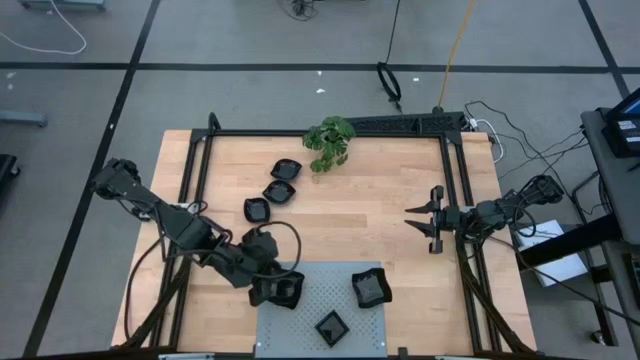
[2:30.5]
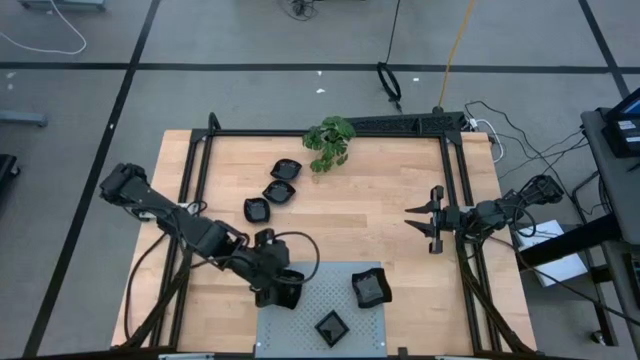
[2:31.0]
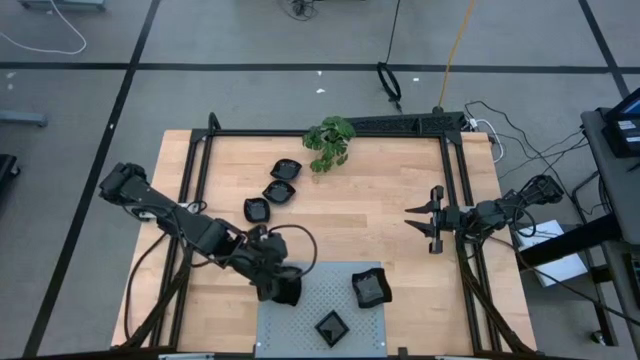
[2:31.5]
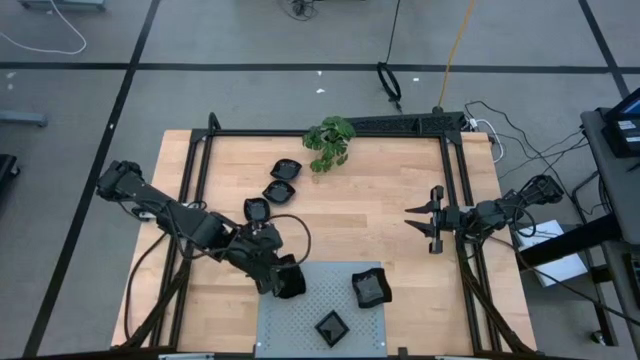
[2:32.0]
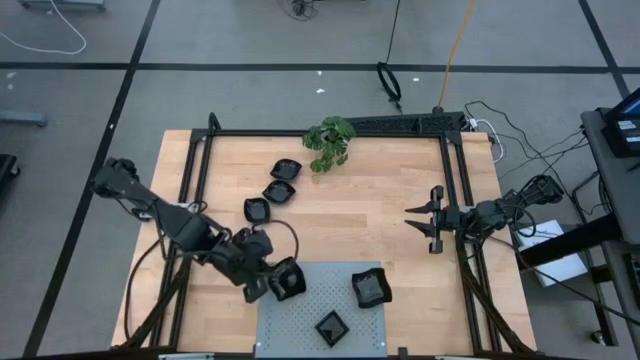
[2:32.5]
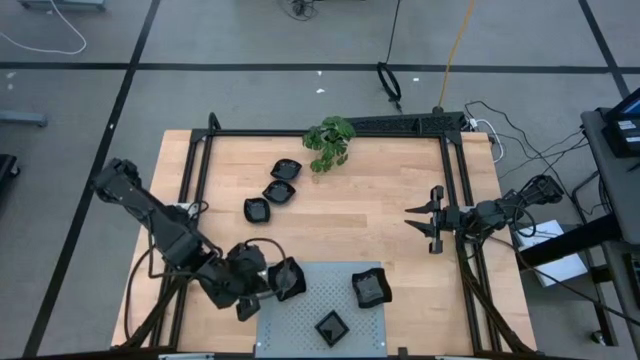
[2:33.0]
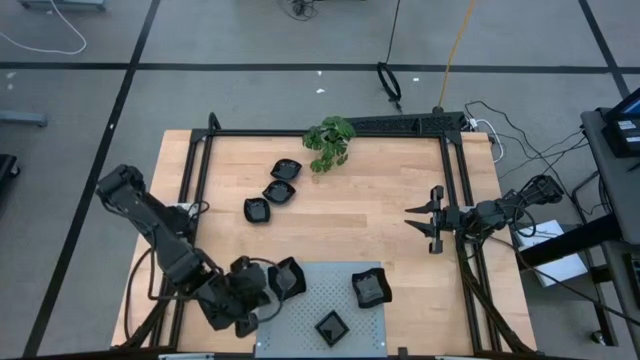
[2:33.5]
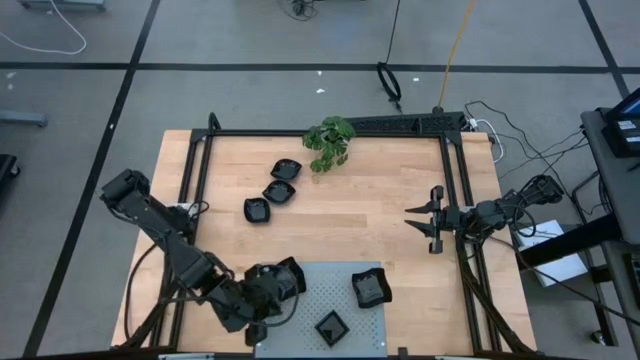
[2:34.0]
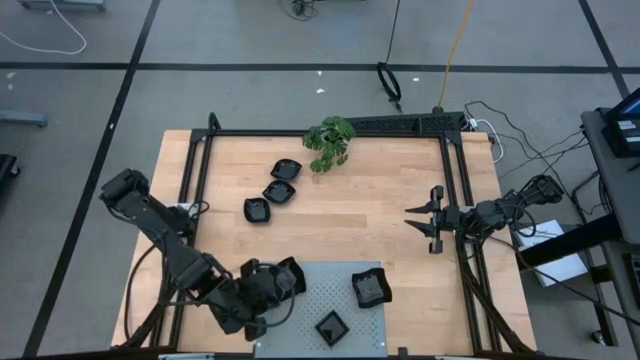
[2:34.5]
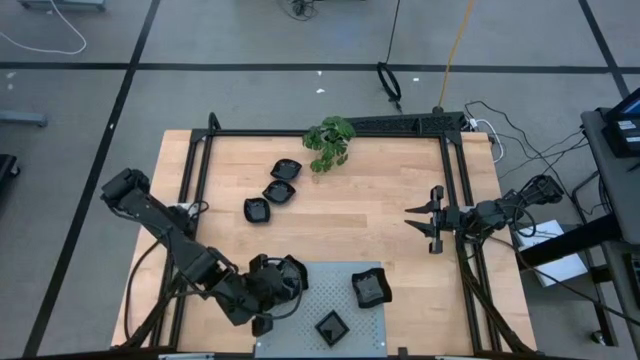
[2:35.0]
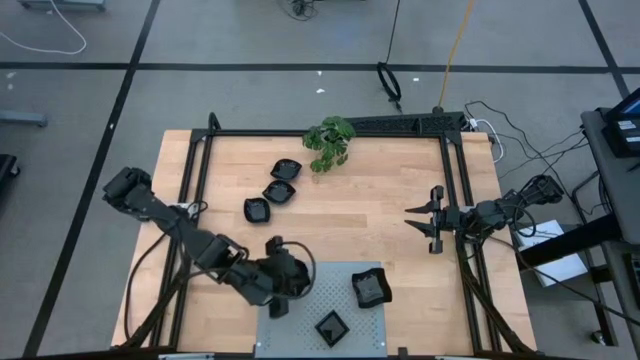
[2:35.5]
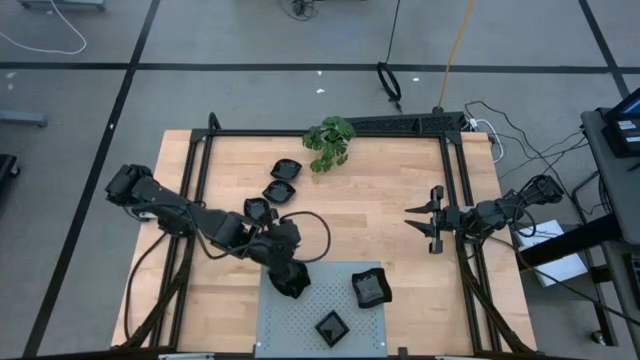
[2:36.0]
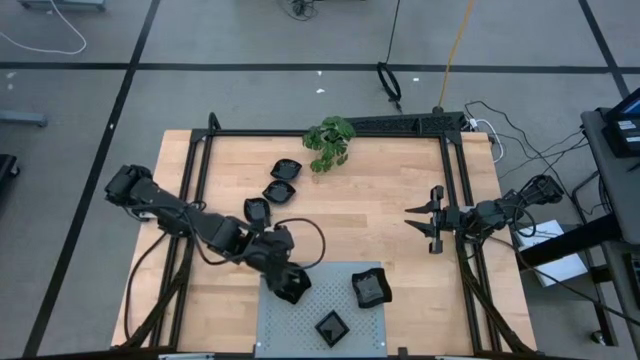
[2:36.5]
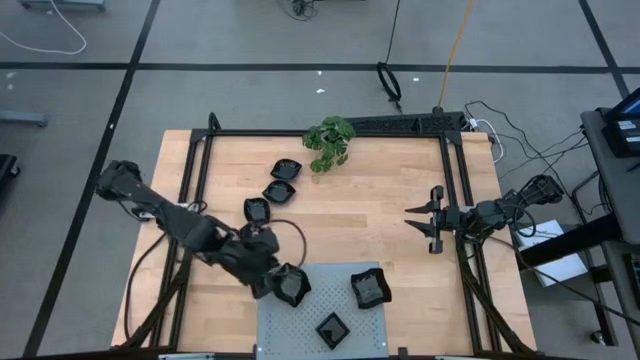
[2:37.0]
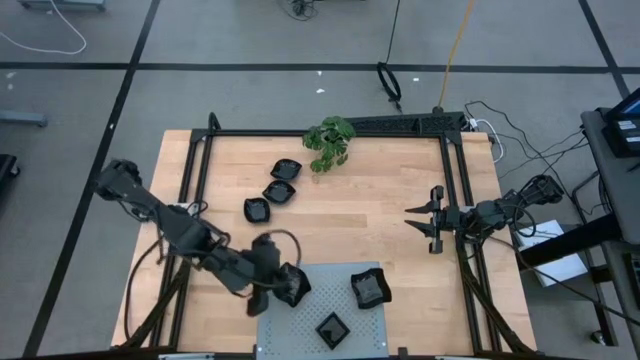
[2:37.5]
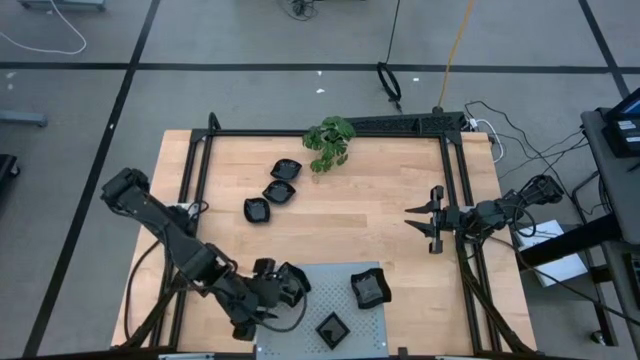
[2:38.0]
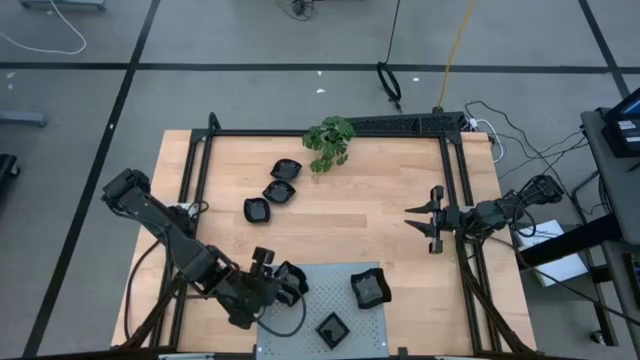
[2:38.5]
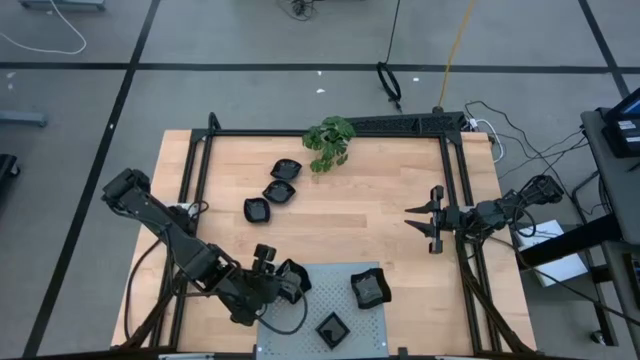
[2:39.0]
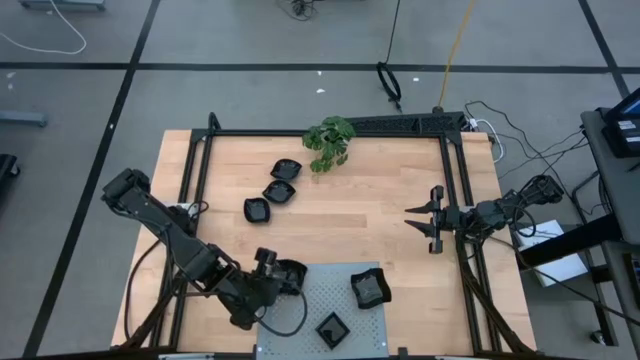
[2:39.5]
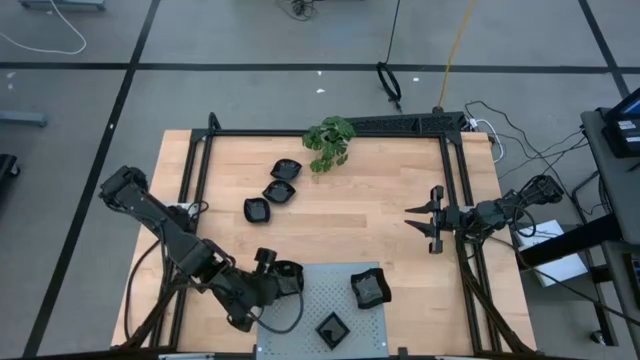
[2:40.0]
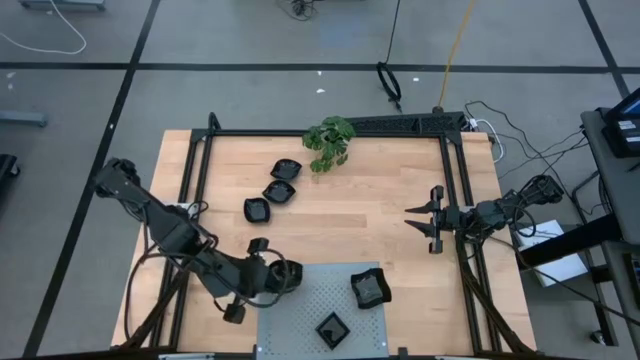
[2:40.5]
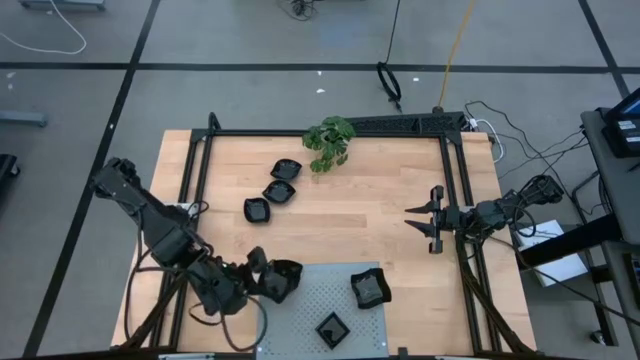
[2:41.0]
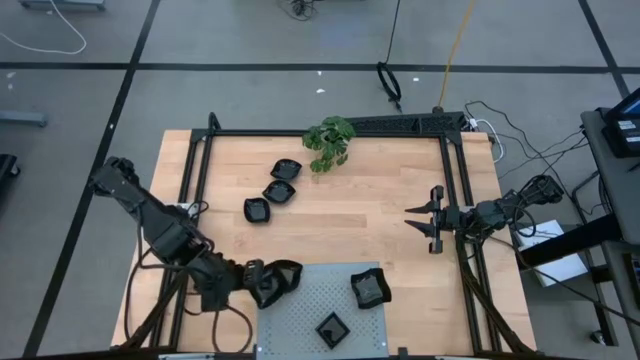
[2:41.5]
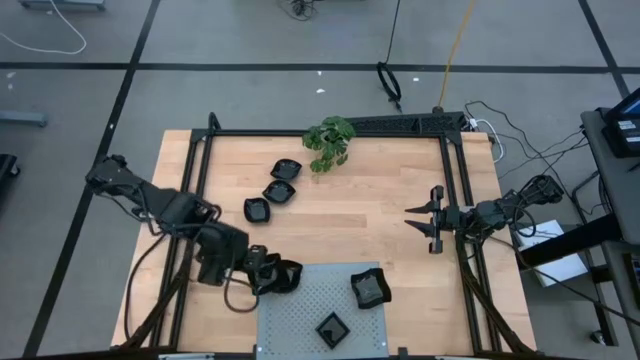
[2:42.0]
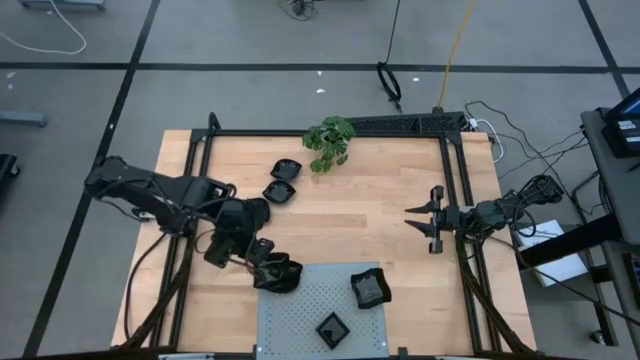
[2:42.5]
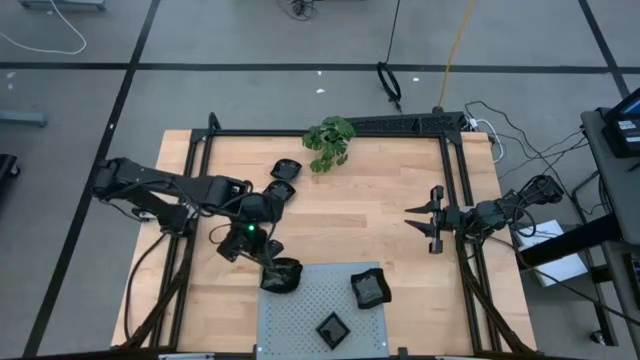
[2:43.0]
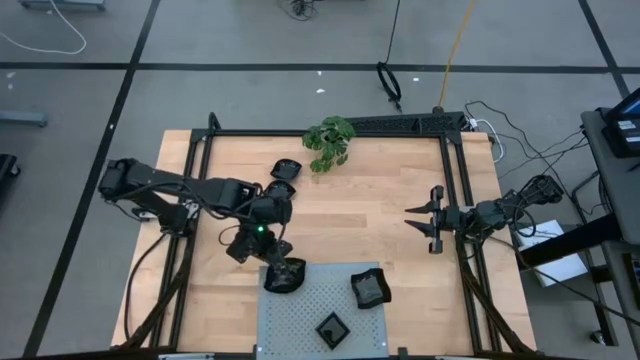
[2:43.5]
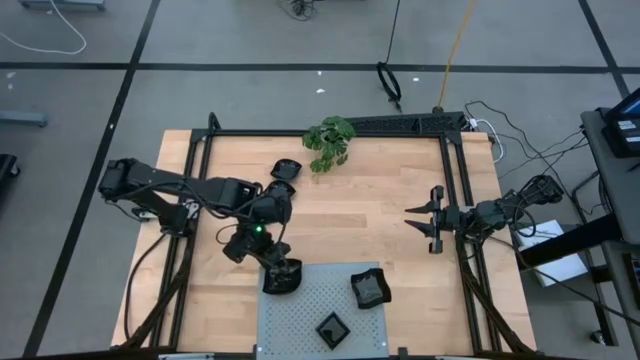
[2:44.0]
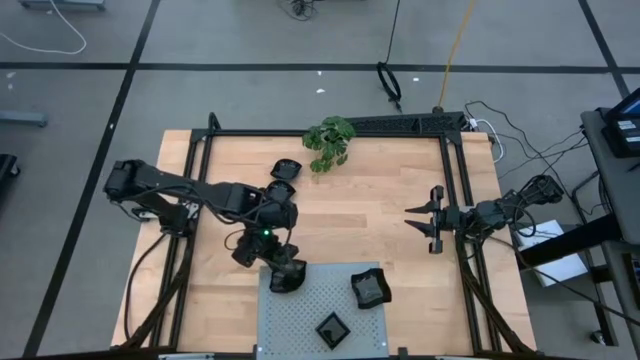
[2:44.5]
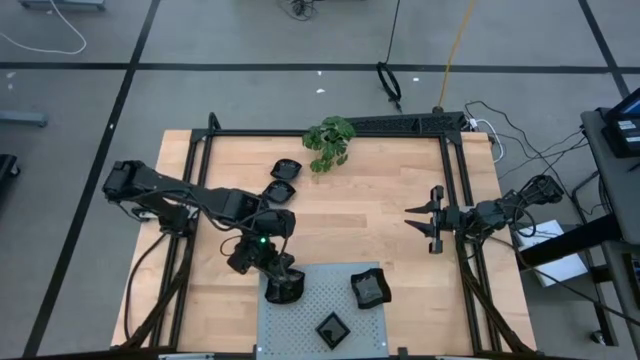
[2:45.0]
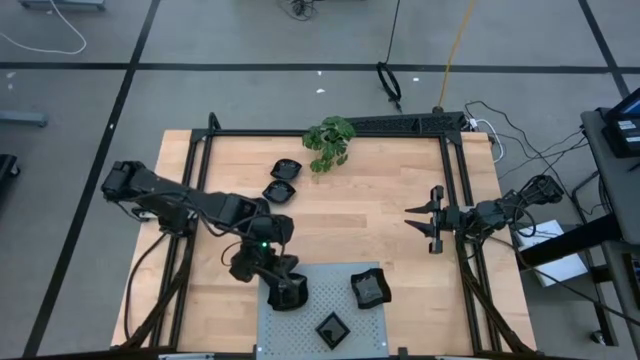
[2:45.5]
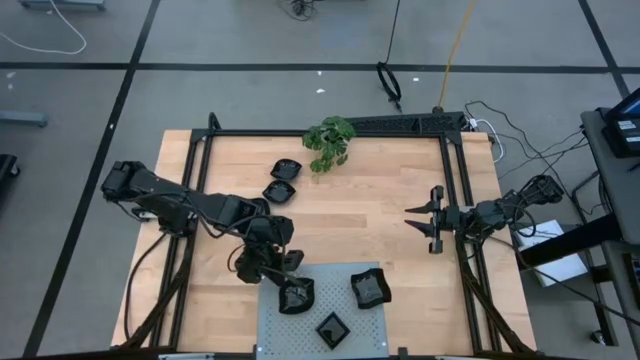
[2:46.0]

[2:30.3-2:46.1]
Task: Pick & Place Mini shaped plates
Adjust the stacked leaf-shaped plate on the shelf

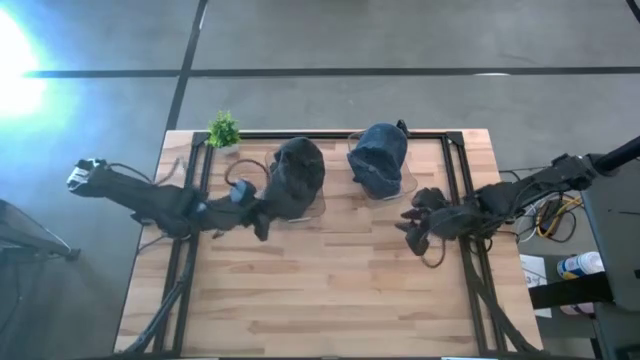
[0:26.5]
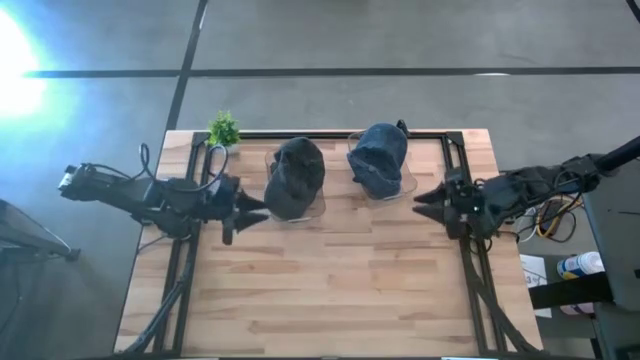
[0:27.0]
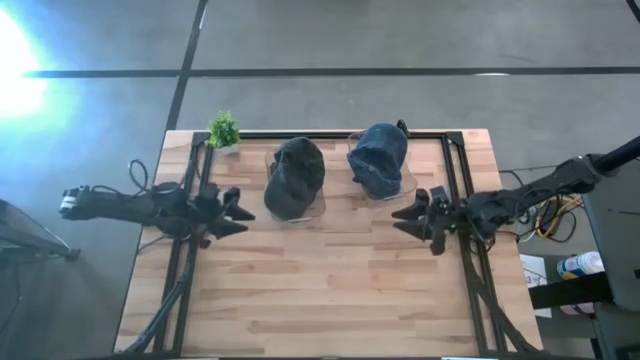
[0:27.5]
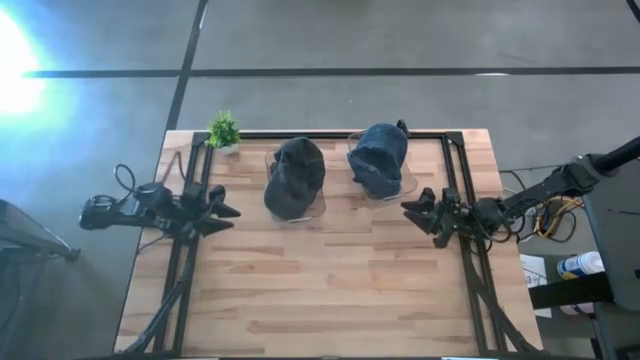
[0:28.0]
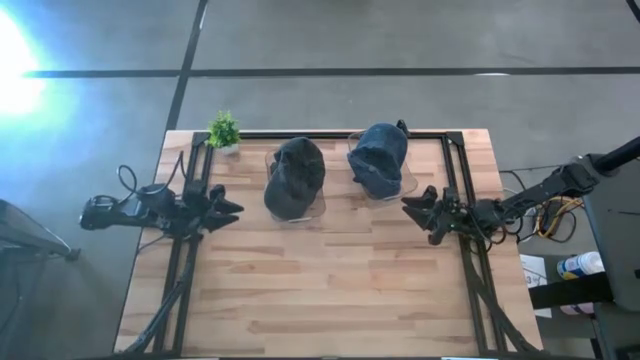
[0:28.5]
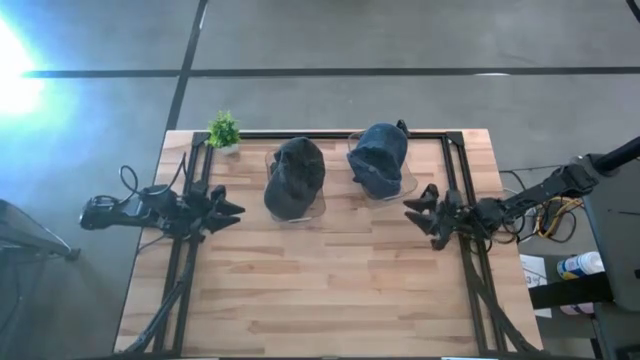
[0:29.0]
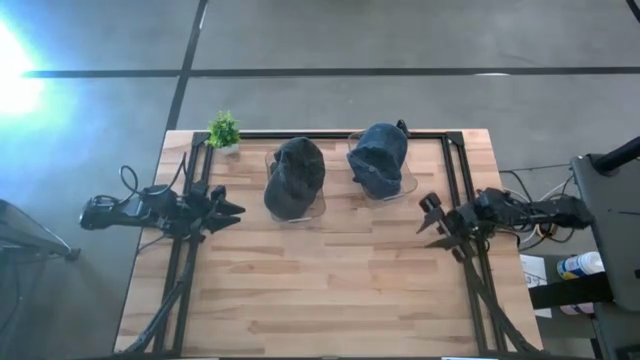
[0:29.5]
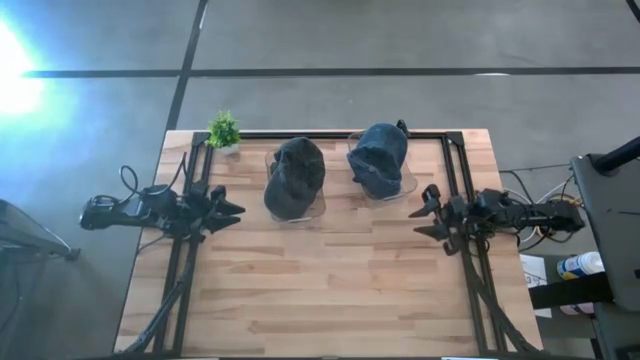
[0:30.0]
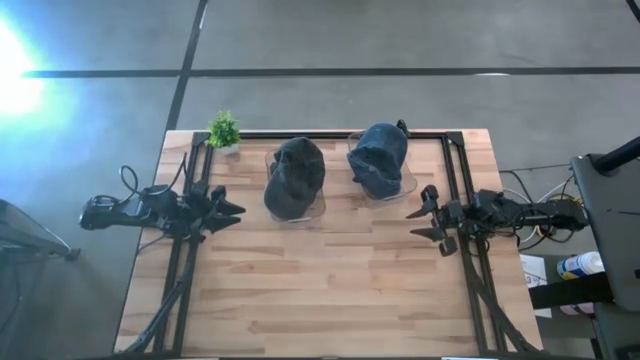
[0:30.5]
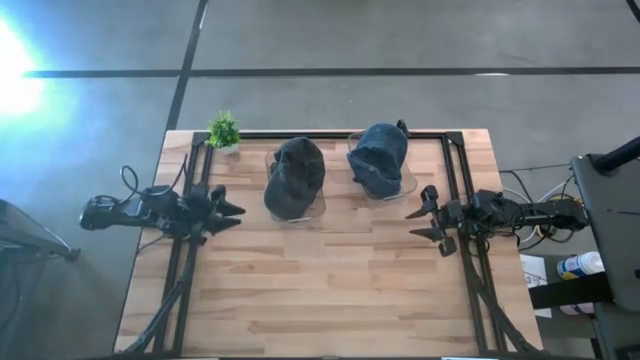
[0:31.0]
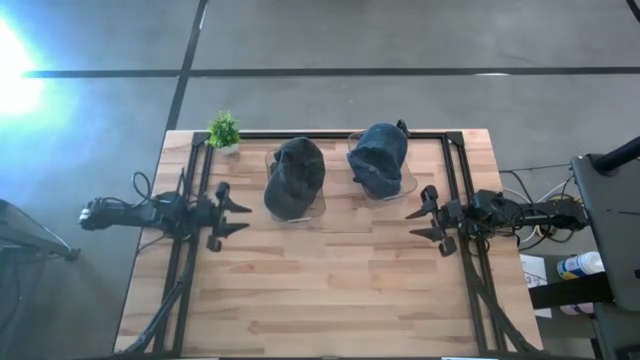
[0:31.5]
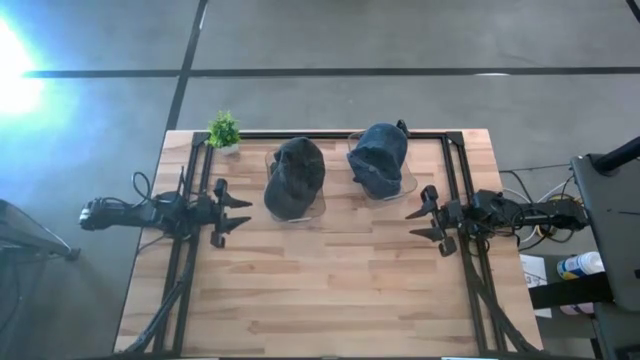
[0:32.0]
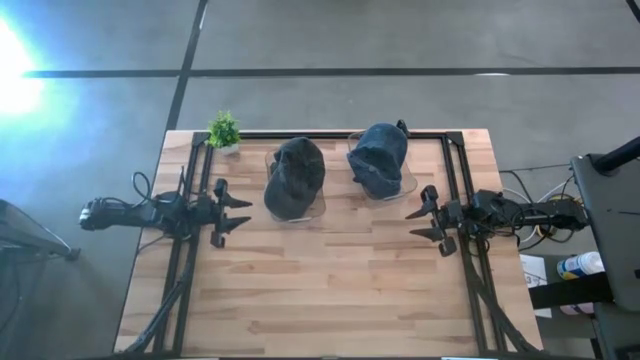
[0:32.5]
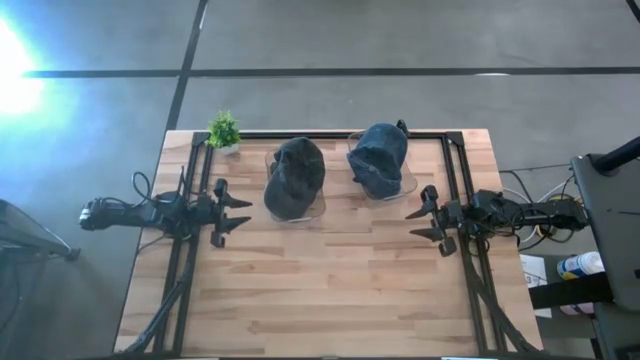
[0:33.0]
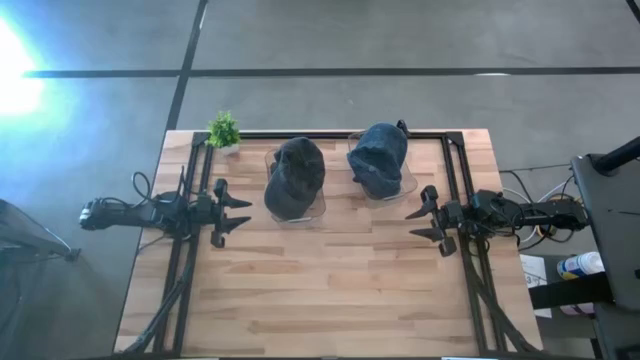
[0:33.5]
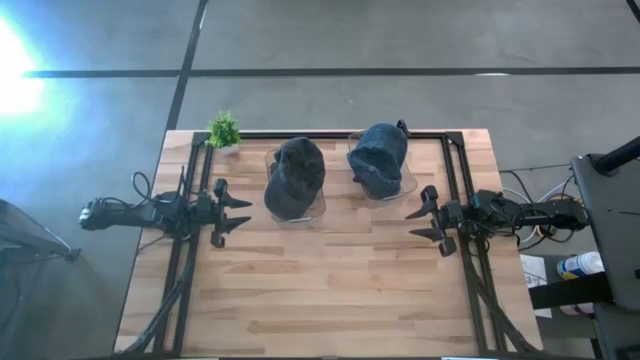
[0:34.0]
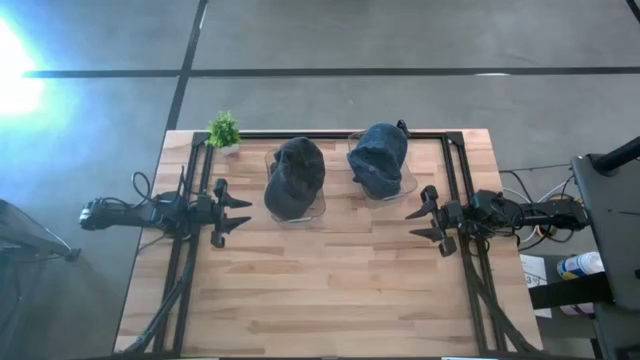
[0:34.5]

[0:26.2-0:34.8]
Task: Pick & Place hat
Return to Home Position
